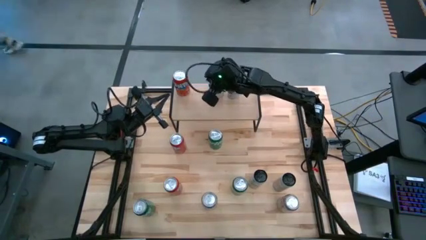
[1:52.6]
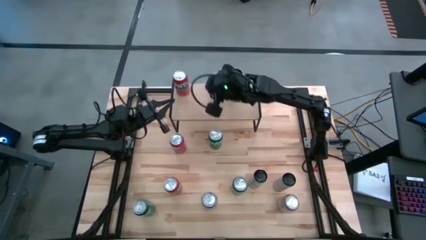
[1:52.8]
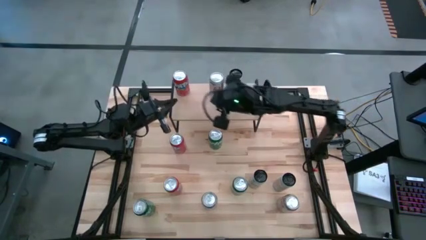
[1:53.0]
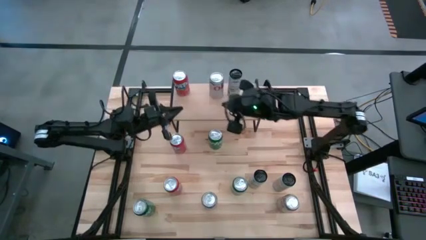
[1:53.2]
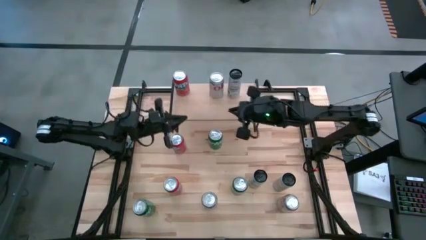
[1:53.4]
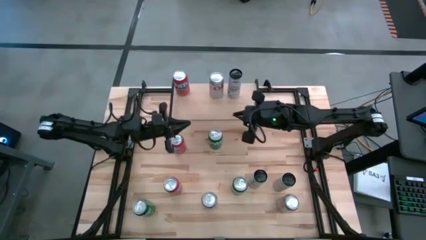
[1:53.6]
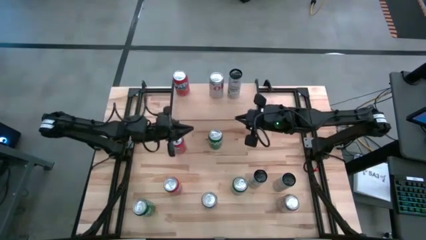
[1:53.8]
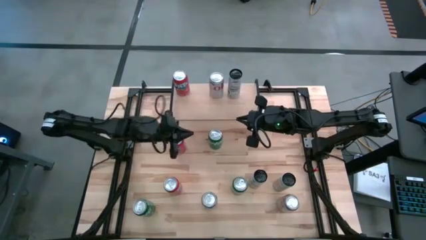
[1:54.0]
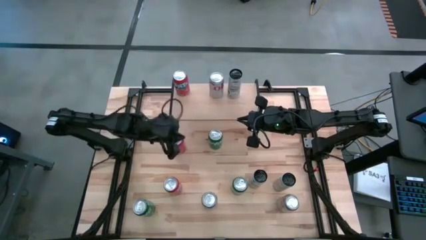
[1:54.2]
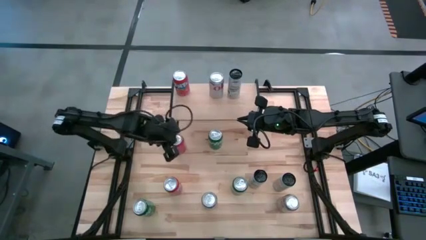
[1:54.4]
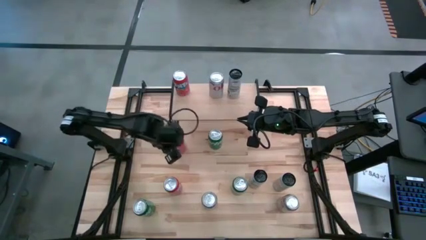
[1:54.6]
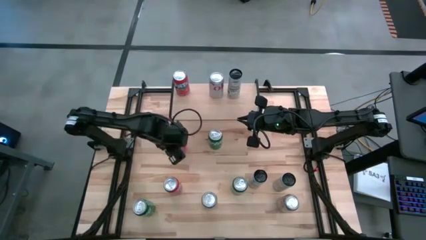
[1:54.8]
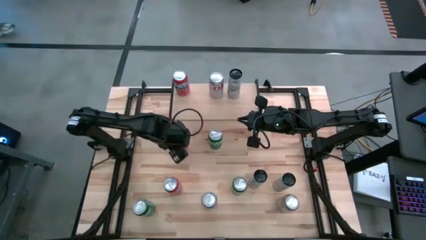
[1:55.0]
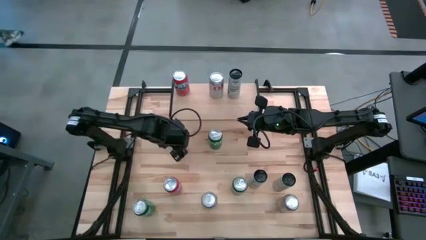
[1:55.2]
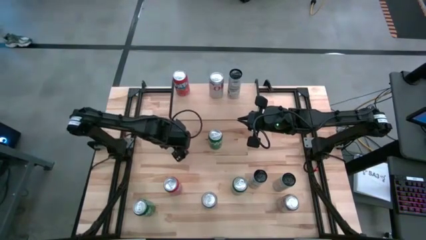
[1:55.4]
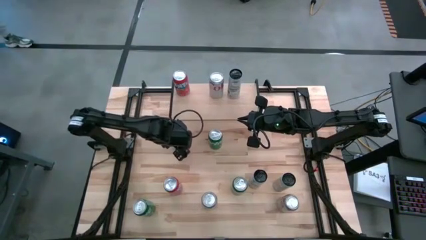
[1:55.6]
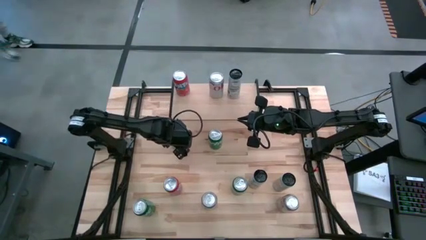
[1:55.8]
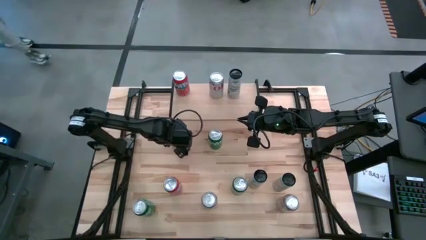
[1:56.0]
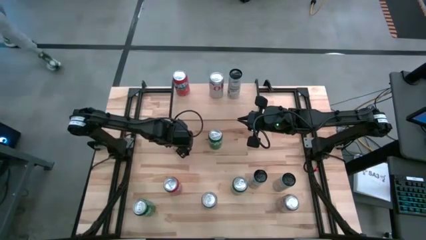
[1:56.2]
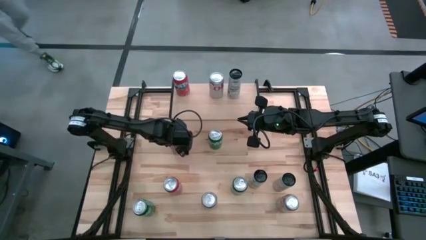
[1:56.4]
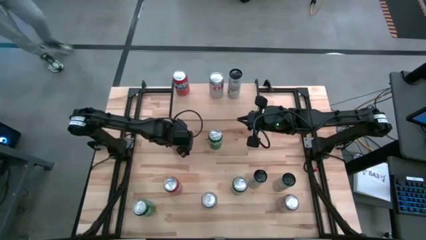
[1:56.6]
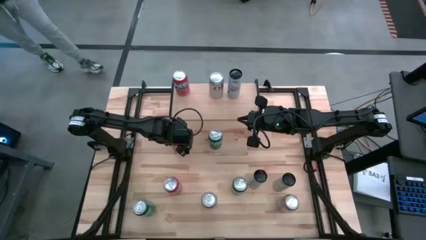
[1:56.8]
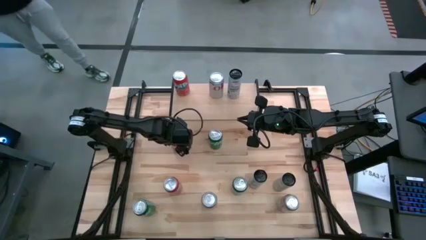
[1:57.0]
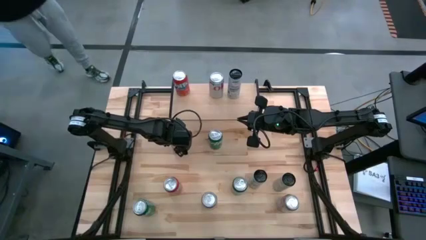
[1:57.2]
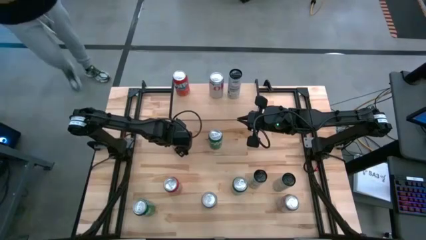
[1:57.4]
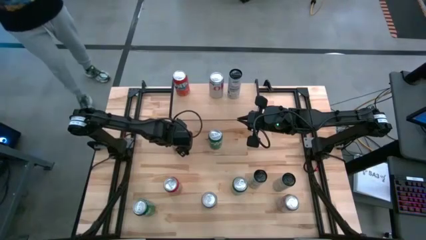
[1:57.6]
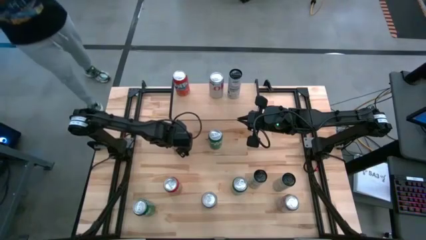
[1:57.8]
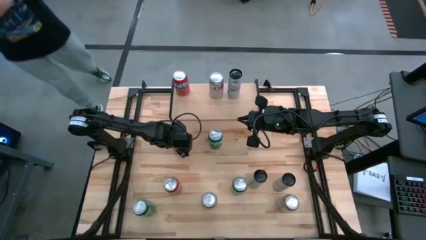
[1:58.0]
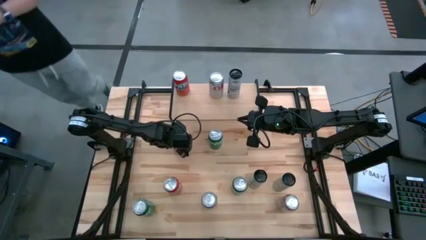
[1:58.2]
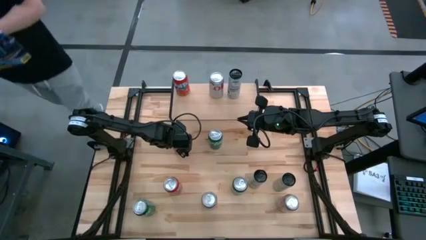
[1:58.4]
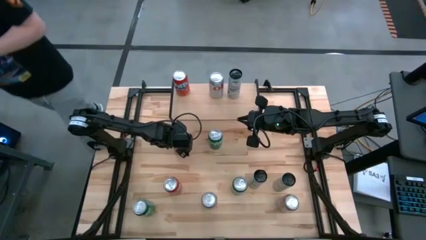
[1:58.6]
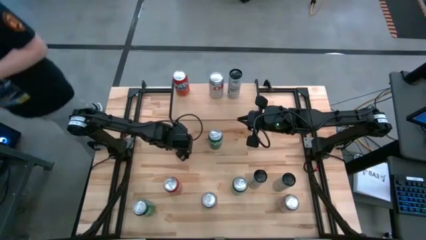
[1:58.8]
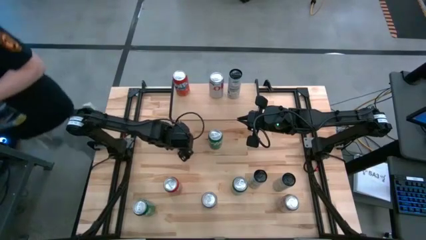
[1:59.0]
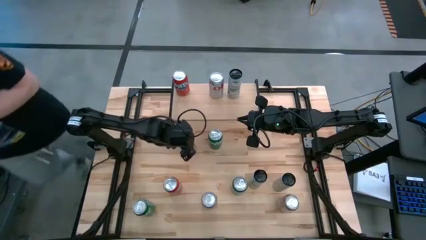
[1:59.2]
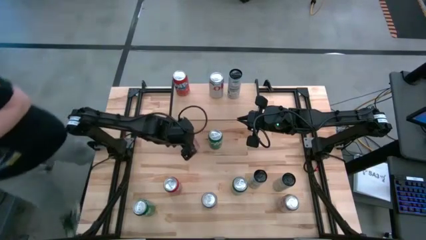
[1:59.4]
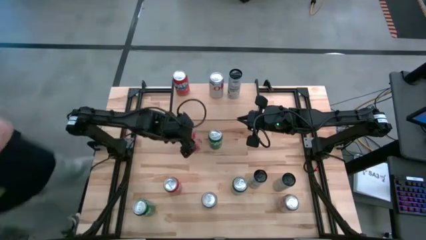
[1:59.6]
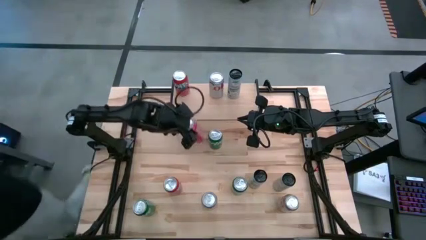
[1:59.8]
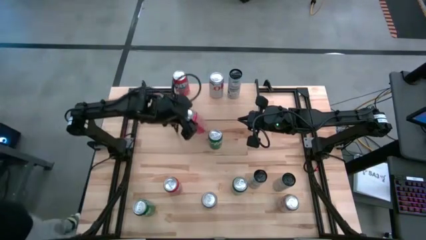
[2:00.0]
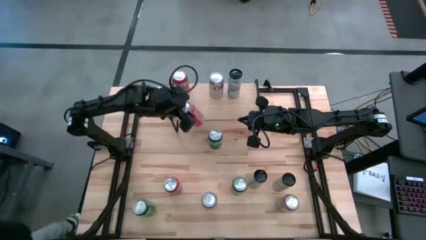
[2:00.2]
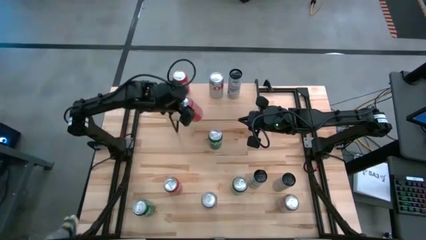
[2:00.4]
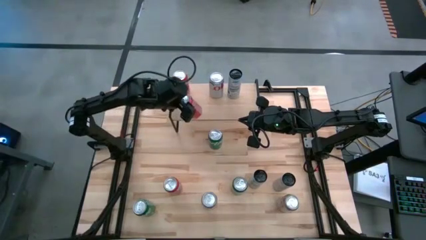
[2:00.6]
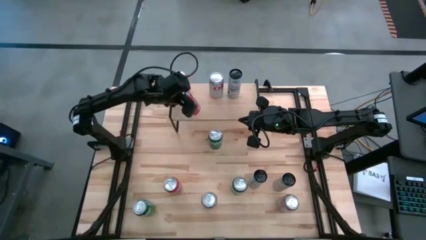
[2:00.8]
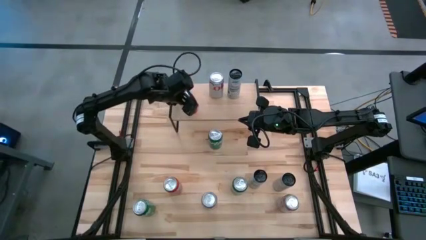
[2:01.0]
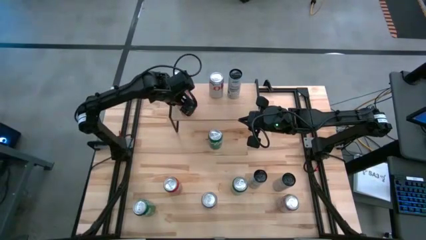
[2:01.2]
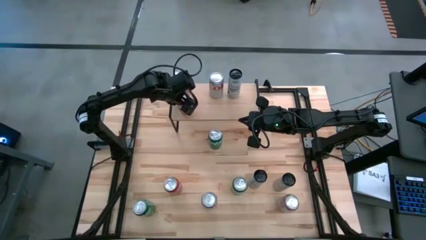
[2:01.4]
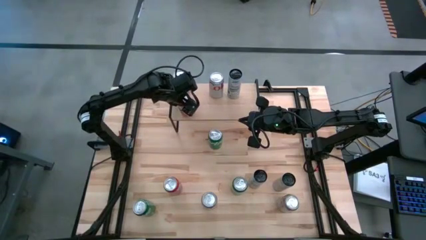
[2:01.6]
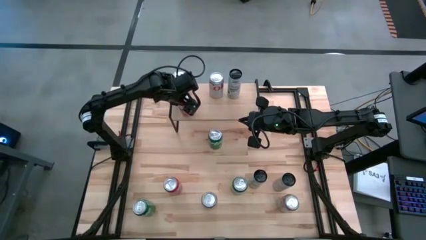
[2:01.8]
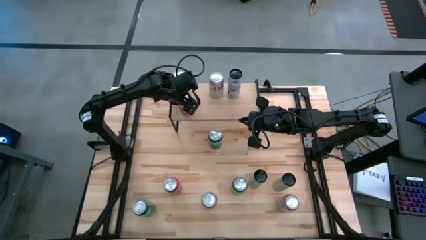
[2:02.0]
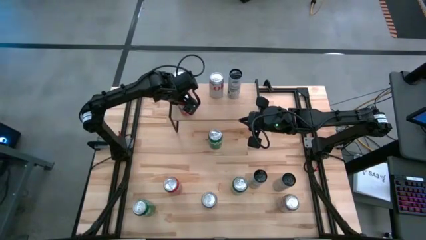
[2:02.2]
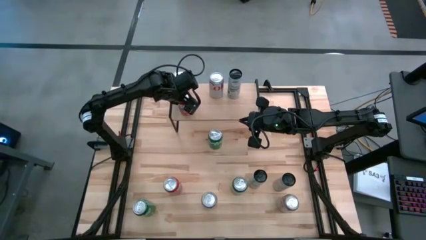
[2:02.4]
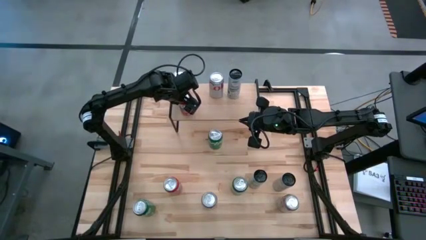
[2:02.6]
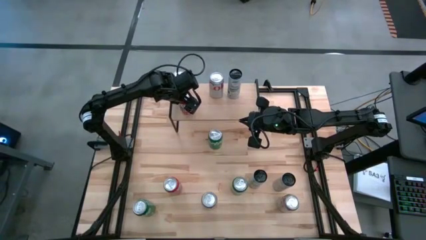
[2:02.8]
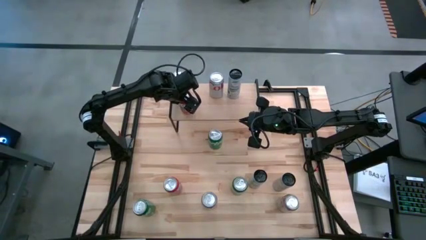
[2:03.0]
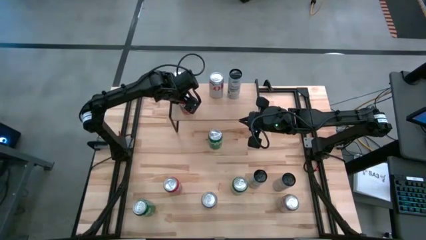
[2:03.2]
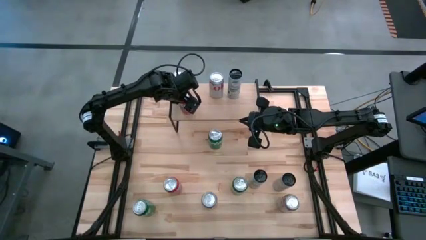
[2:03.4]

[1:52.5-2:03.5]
Task: Place canned beverage on shelf
Put the top orange soda can on the shelf aligned with the other orange soda can

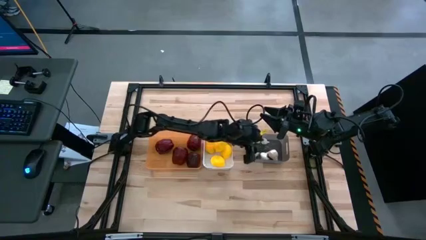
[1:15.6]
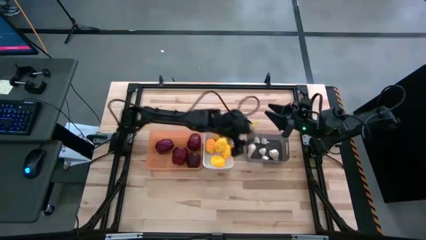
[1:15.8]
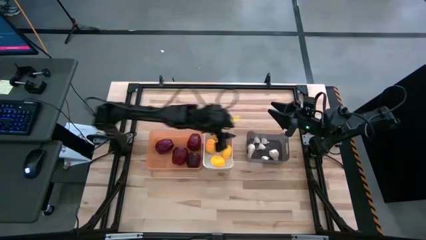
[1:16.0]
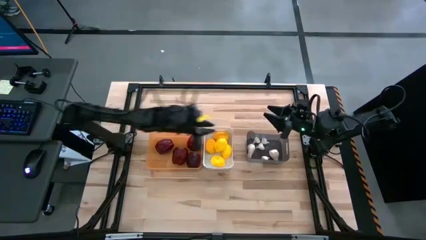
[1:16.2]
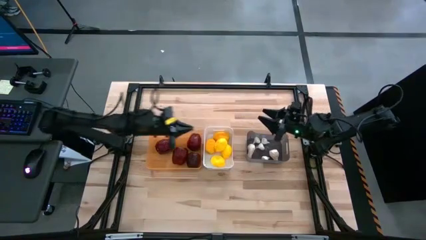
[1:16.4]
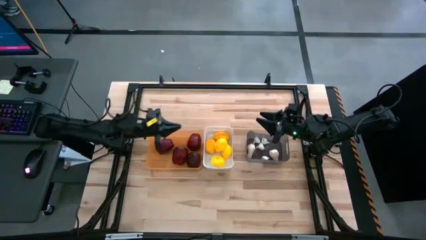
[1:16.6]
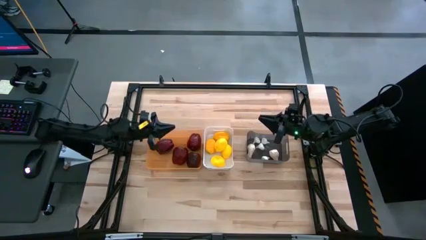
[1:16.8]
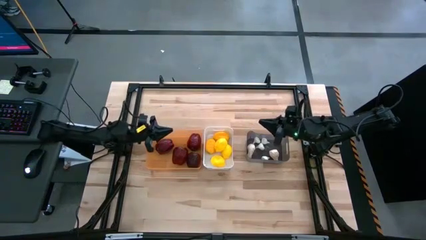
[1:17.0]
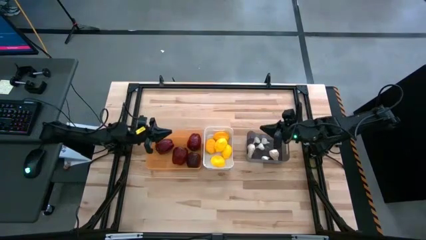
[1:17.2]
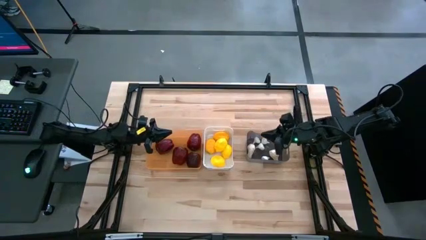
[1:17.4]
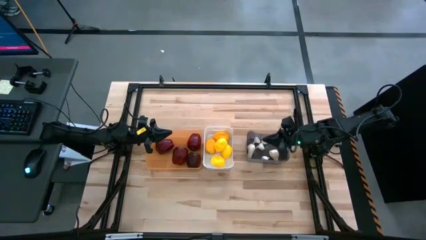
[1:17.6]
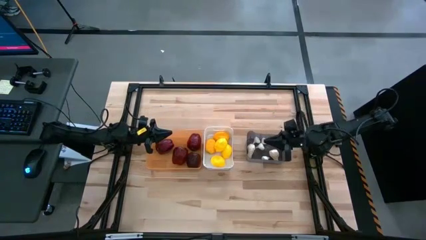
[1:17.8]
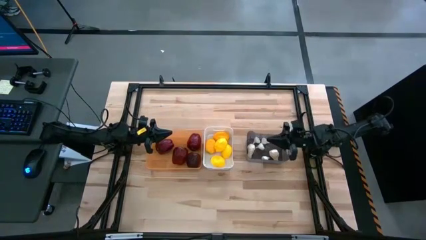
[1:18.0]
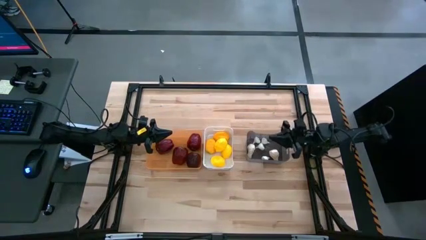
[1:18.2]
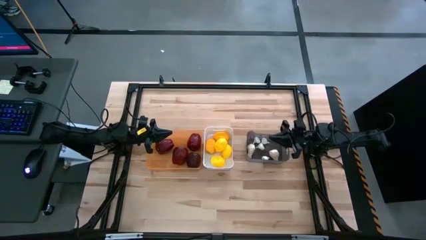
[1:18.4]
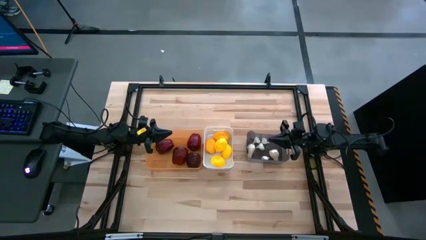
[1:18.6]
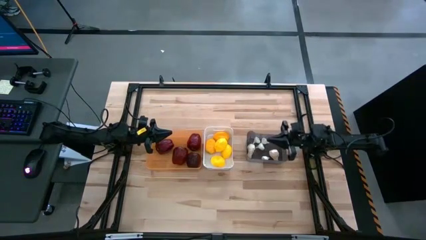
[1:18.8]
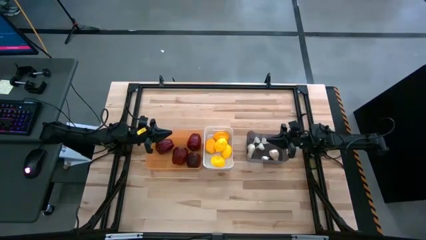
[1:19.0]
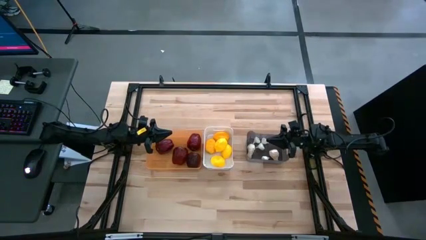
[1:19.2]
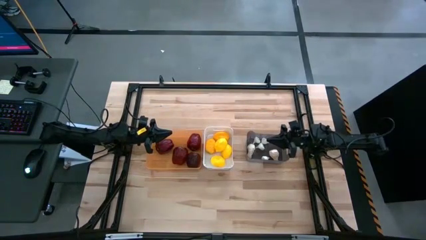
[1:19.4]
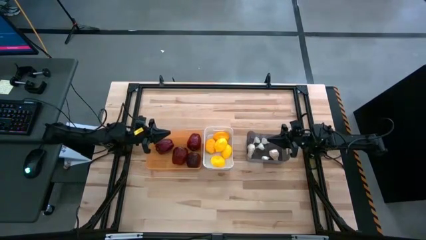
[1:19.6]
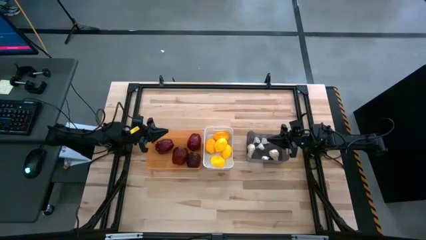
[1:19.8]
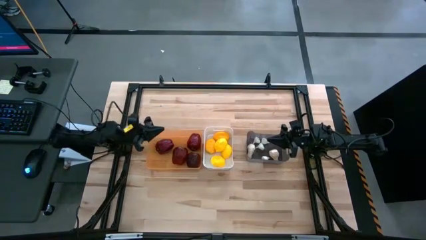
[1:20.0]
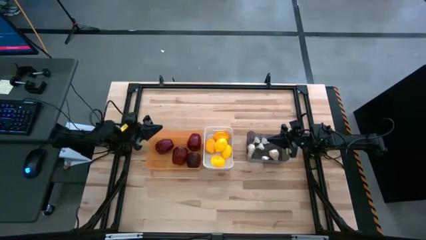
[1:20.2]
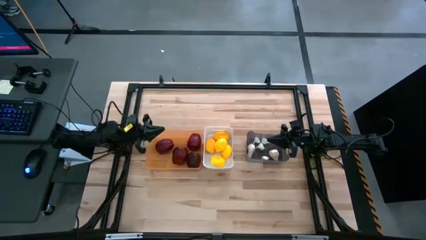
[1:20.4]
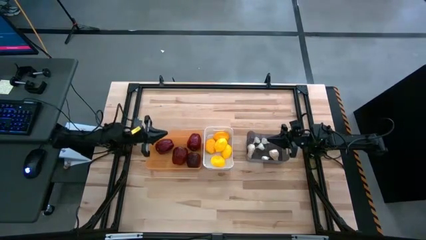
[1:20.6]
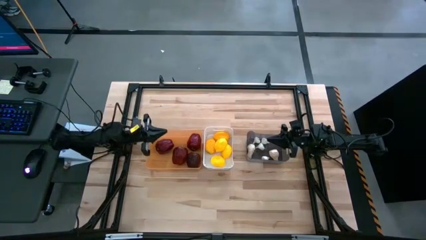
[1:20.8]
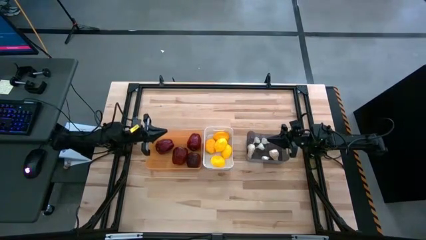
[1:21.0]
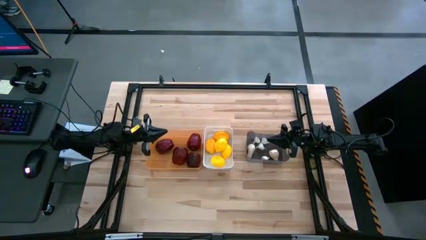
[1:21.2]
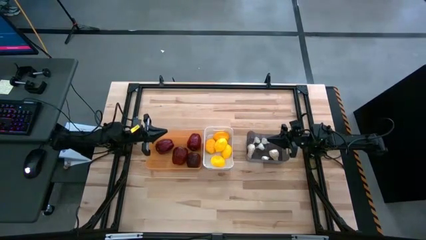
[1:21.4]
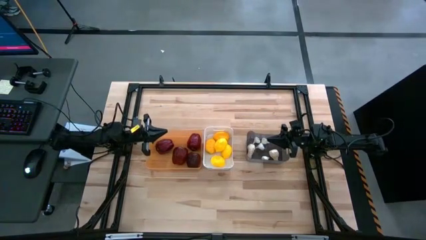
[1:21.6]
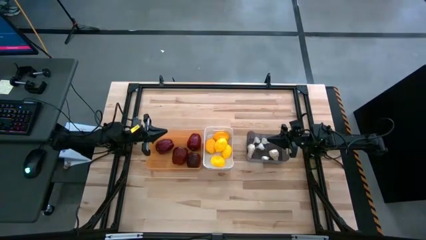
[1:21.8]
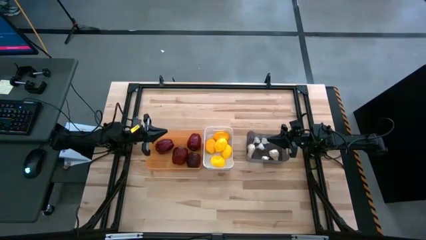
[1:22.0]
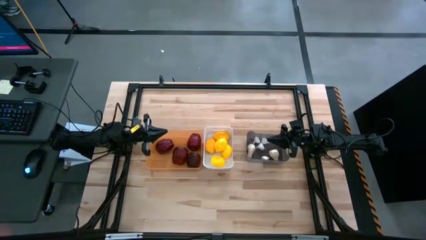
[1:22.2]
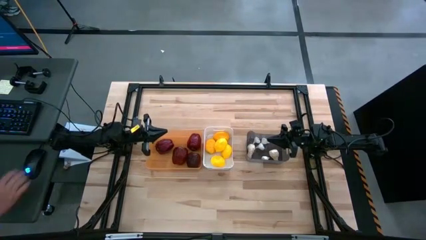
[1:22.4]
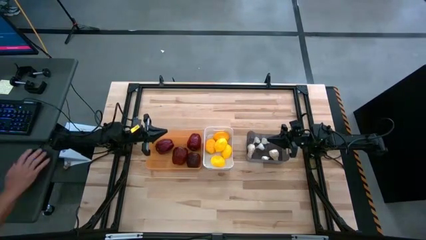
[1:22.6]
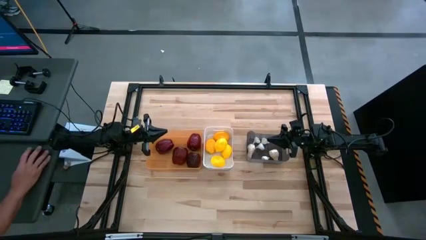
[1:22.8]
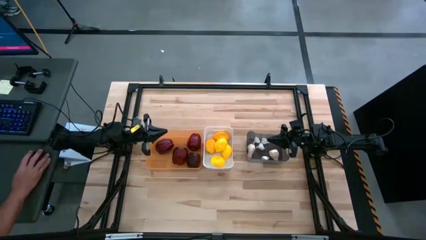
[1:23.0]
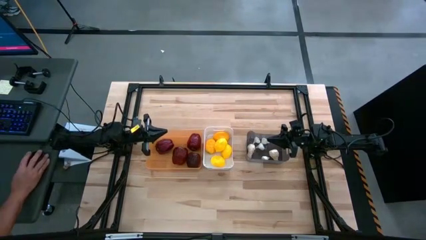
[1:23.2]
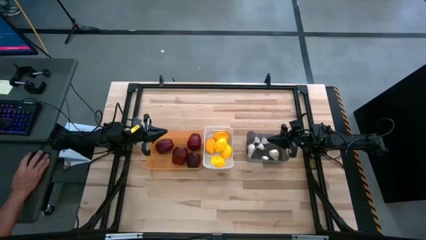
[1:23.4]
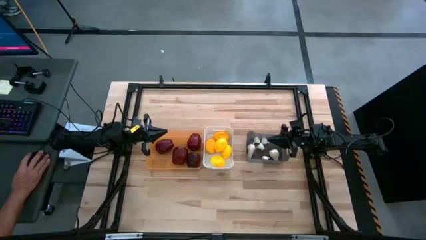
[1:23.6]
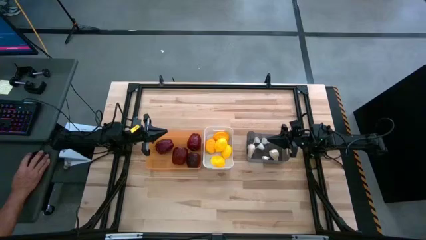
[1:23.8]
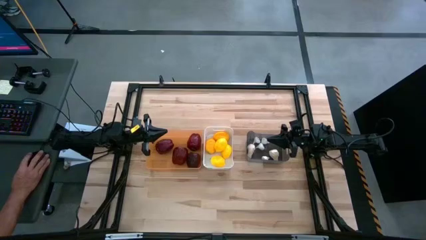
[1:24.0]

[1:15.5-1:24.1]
Task: Sort produce into baskets
Return to Home Position
